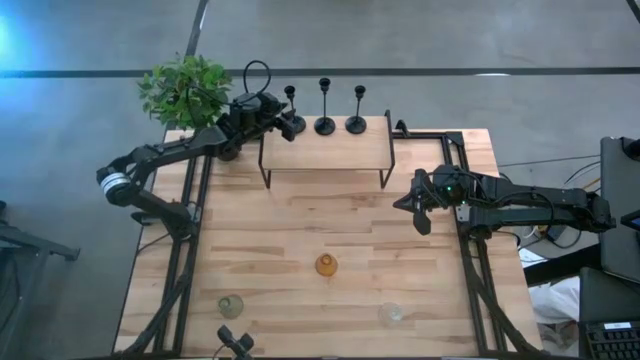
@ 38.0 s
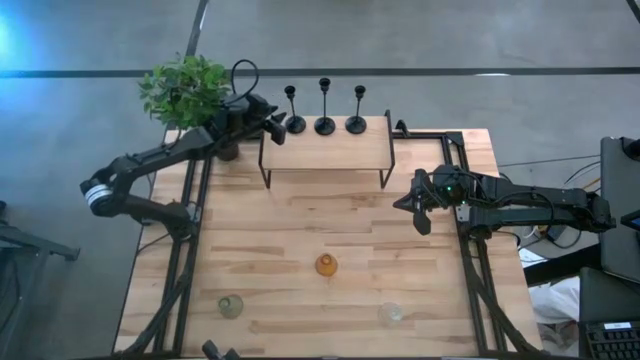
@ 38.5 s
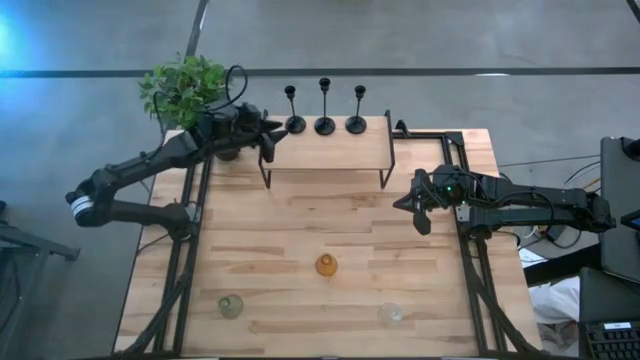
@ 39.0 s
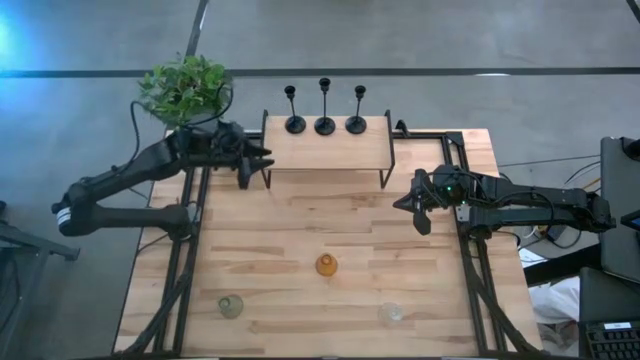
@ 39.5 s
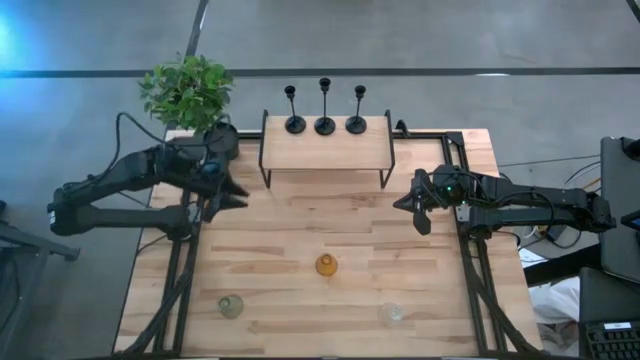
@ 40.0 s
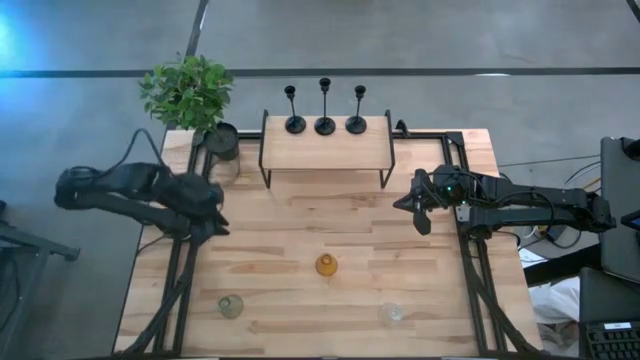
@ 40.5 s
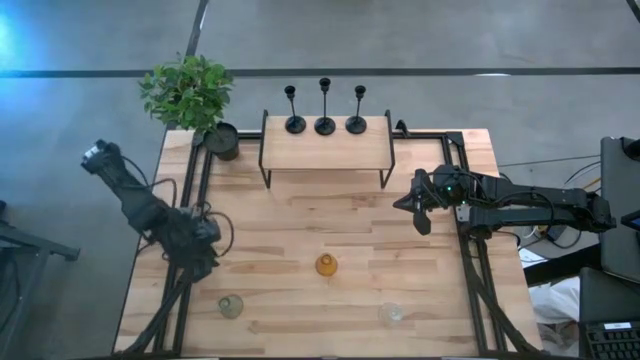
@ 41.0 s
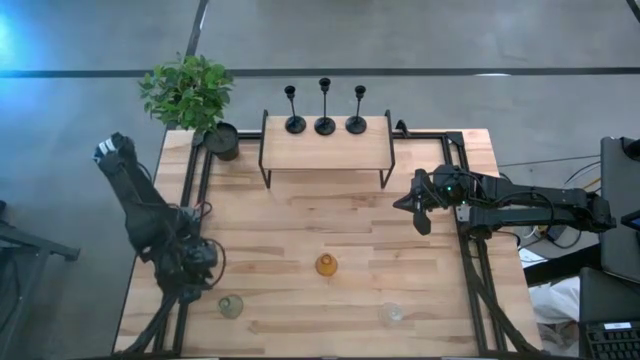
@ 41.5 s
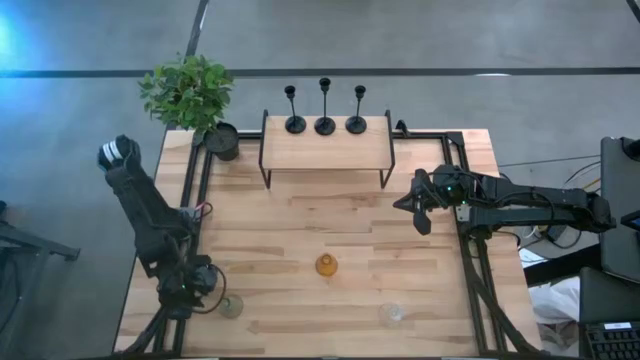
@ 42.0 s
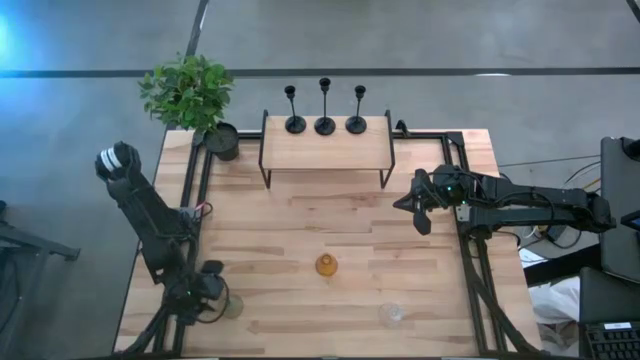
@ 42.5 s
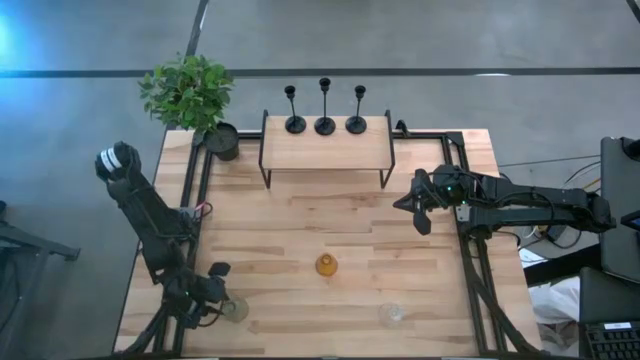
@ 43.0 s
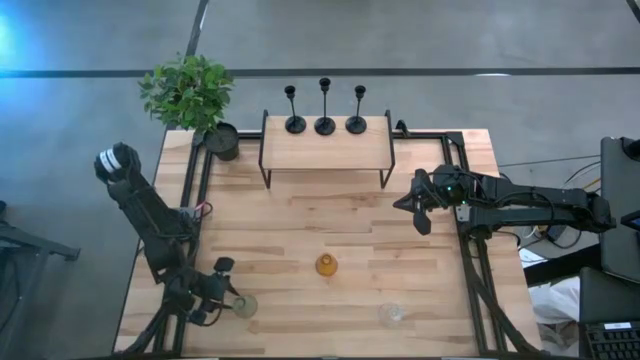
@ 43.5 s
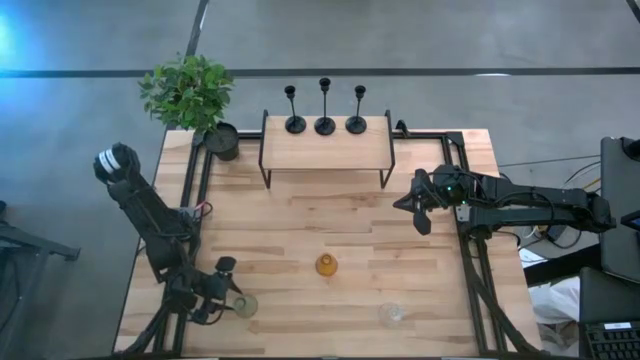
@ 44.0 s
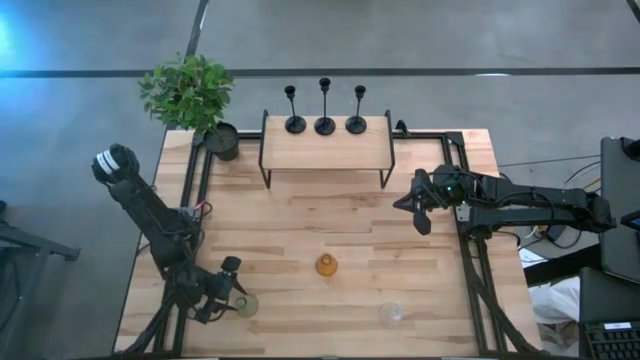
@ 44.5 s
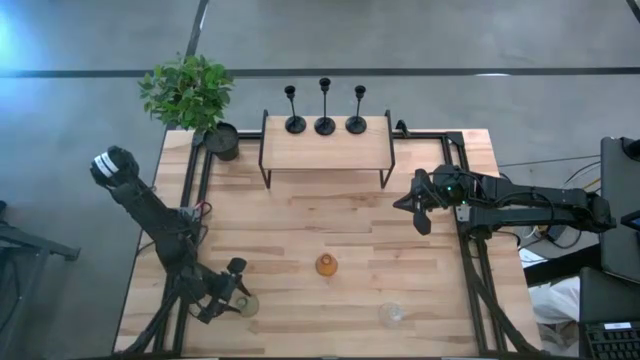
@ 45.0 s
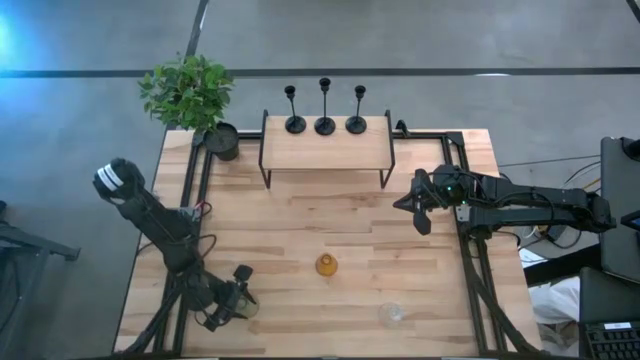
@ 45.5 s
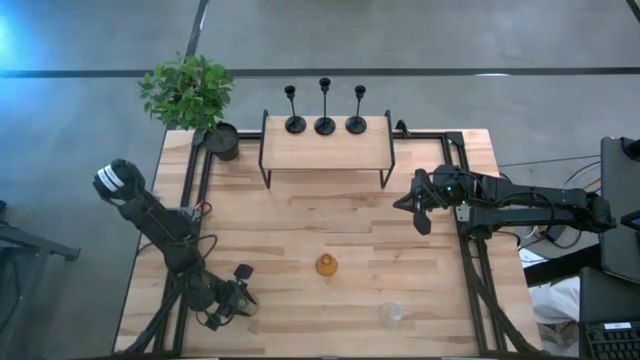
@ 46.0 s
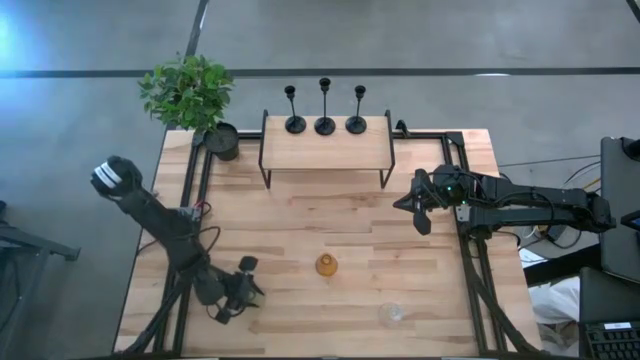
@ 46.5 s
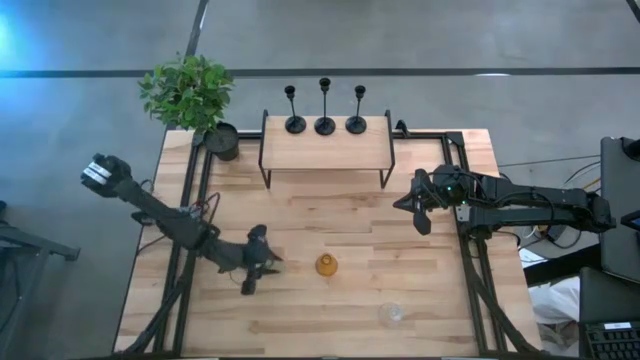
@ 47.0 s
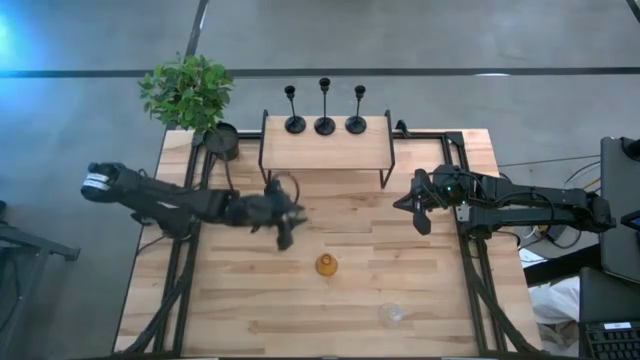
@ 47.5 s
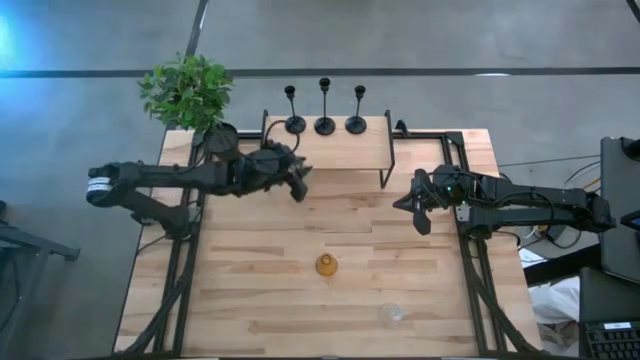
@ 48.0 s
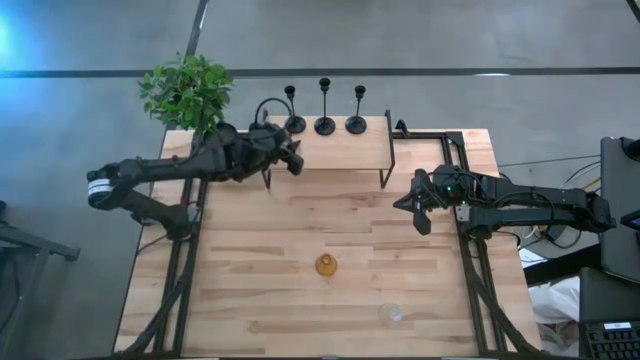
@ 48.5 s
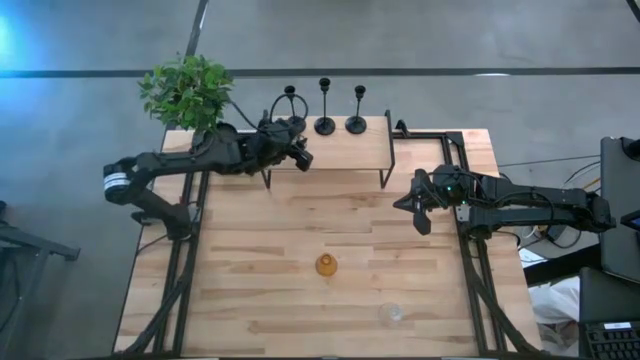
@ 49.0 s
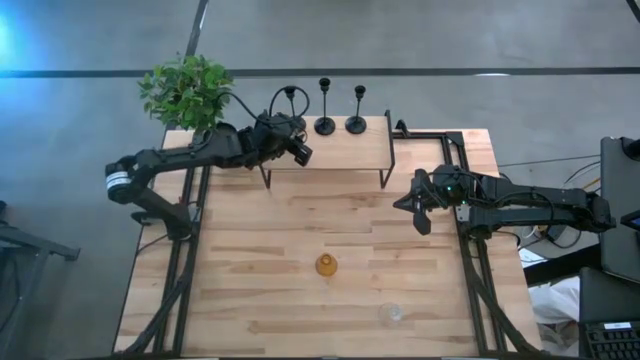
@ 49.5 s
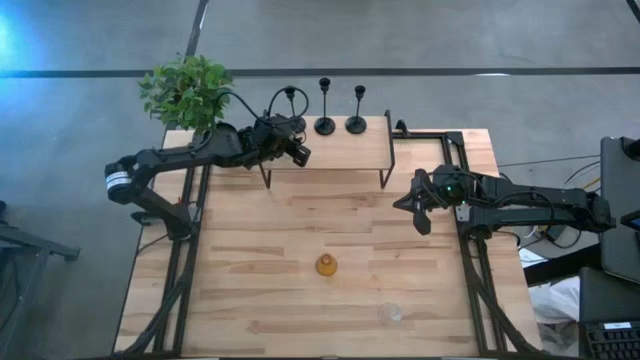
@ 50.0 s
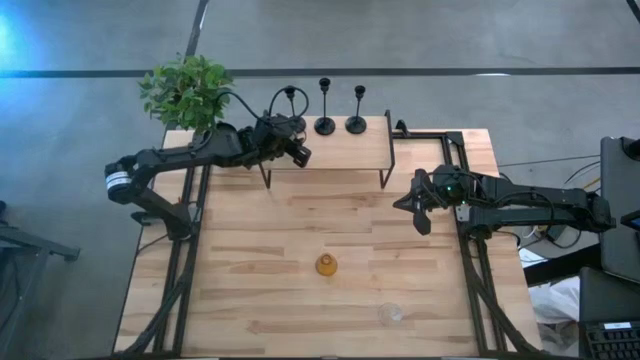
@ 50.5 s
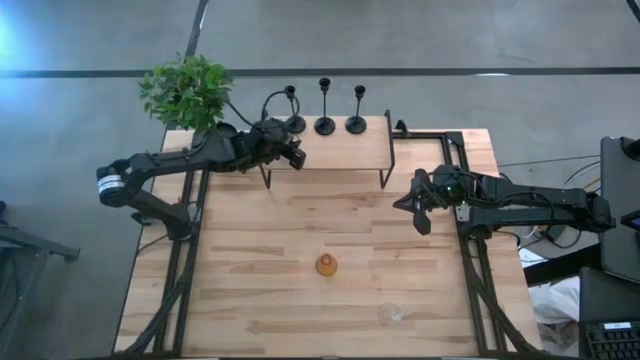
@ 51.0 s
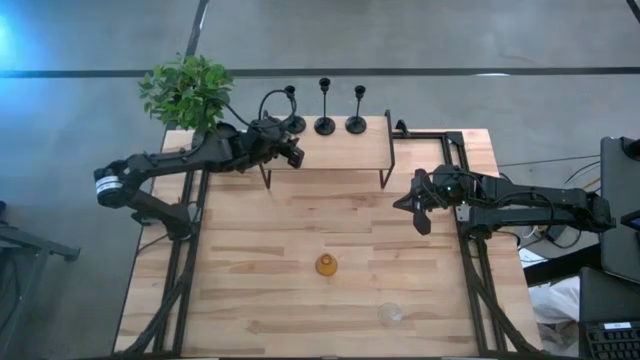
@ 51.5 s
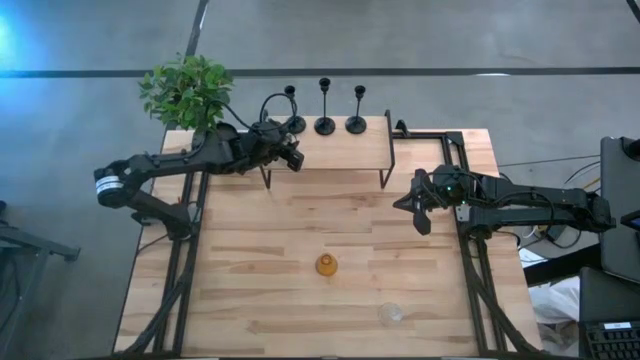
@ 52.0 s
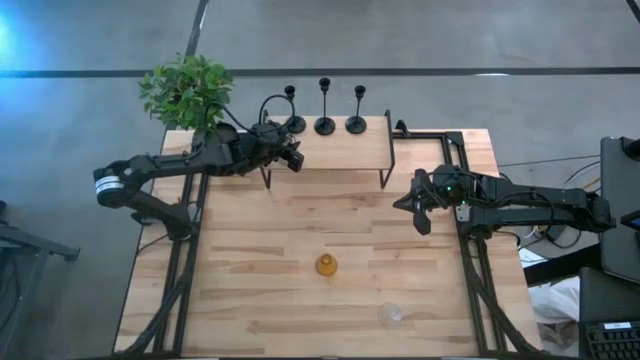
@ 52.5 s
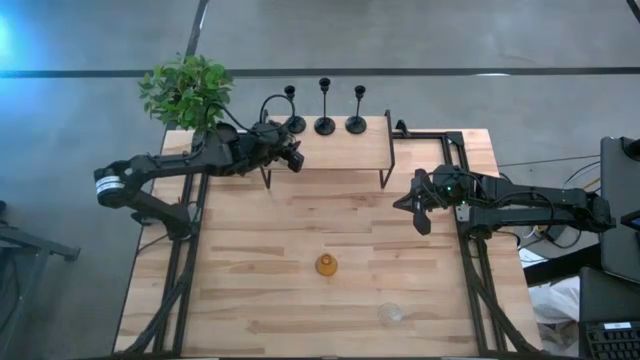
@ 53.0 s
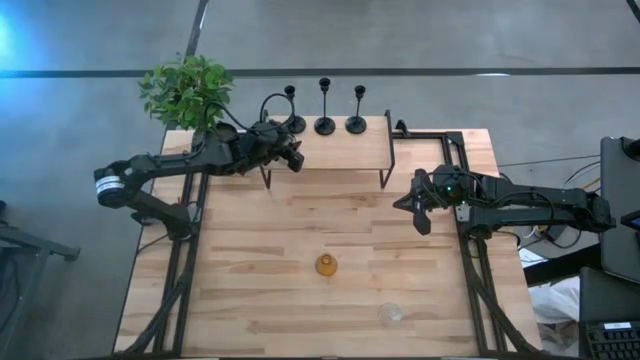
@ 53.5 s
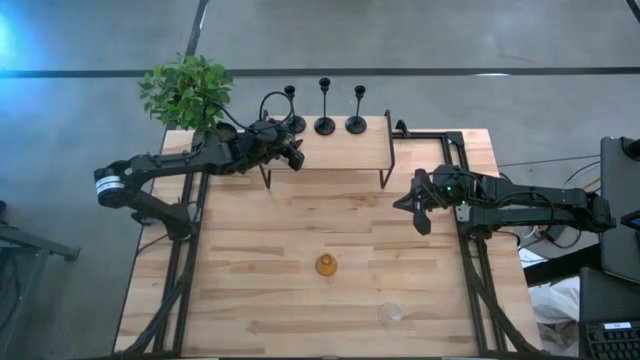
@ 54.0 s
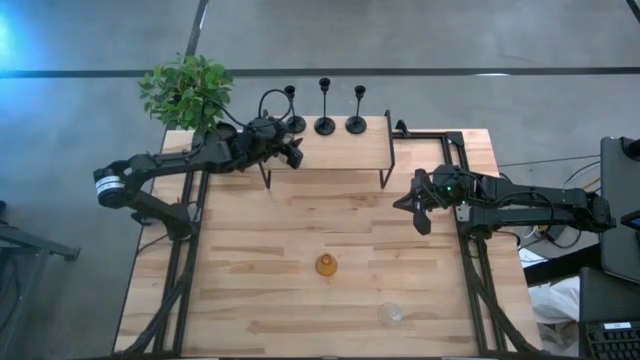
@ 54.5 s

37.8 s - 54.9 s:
Task: Pick & Place candle stick holders
Put the green candle holder on the shelf

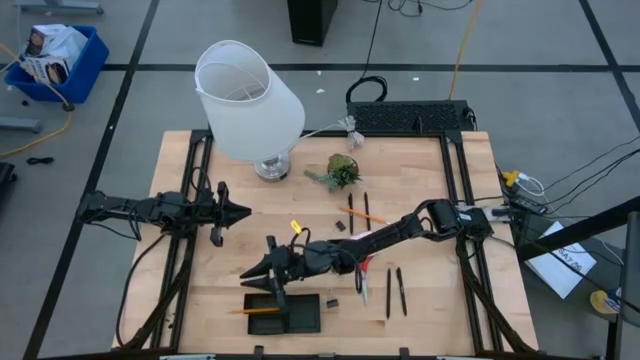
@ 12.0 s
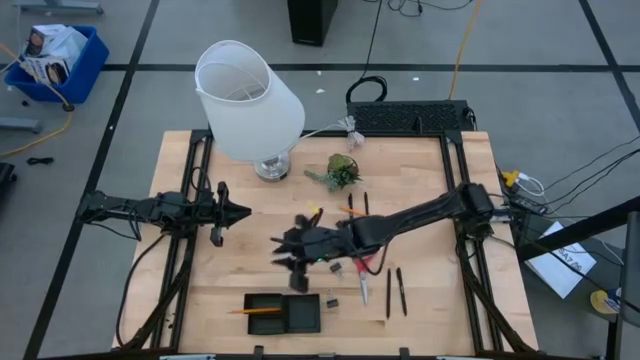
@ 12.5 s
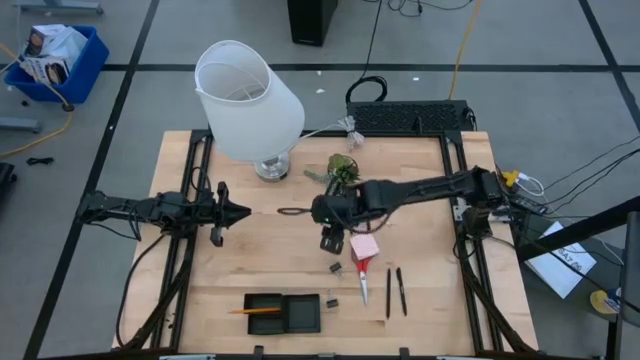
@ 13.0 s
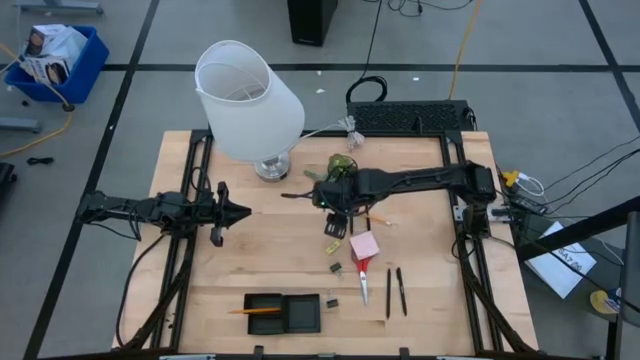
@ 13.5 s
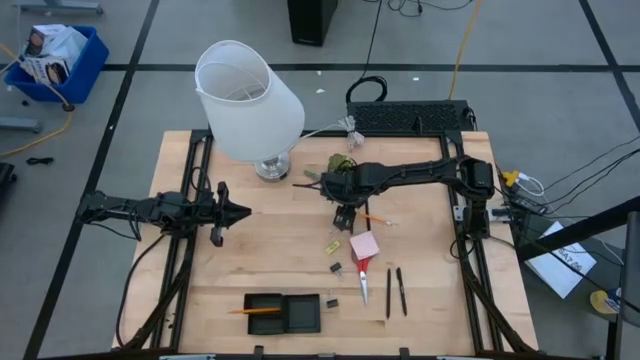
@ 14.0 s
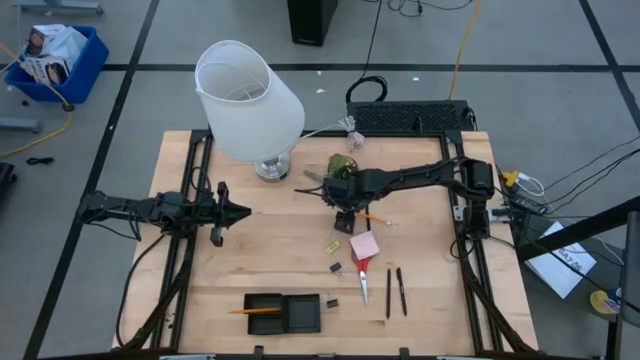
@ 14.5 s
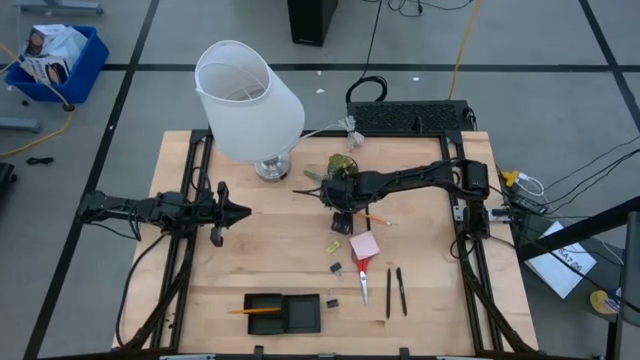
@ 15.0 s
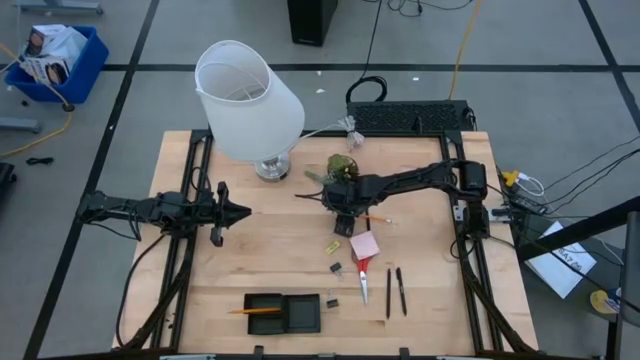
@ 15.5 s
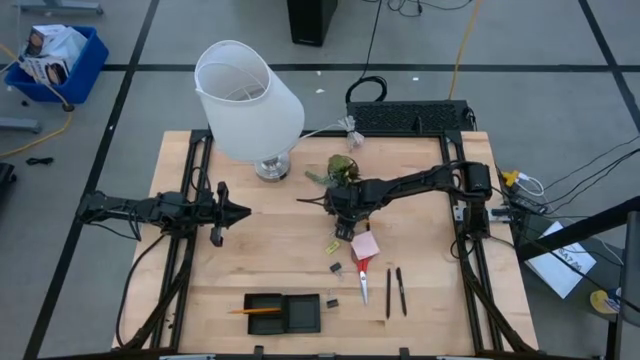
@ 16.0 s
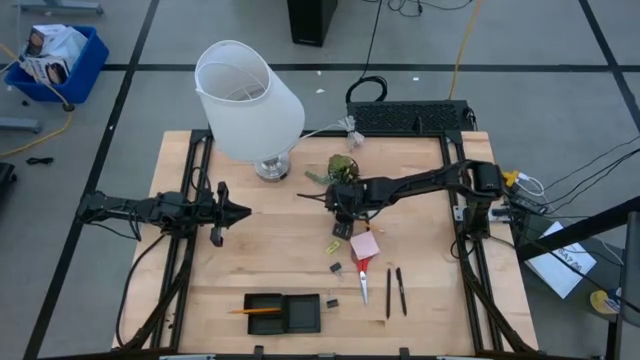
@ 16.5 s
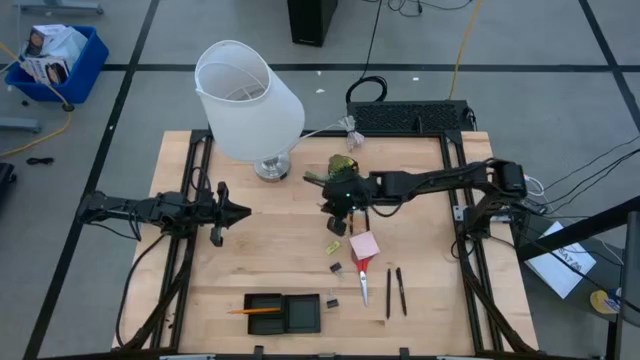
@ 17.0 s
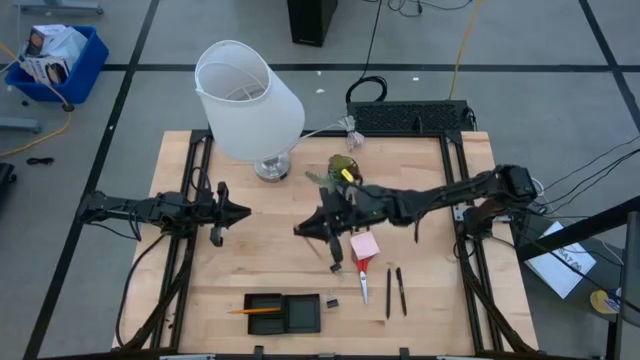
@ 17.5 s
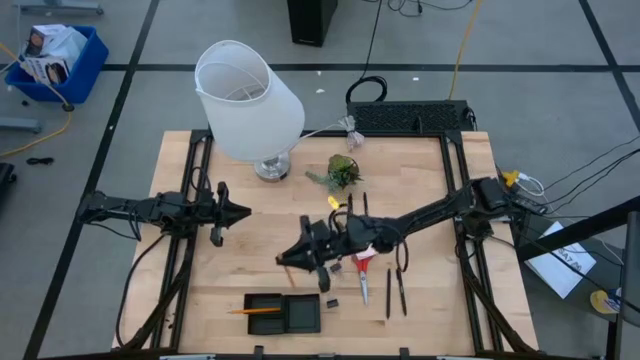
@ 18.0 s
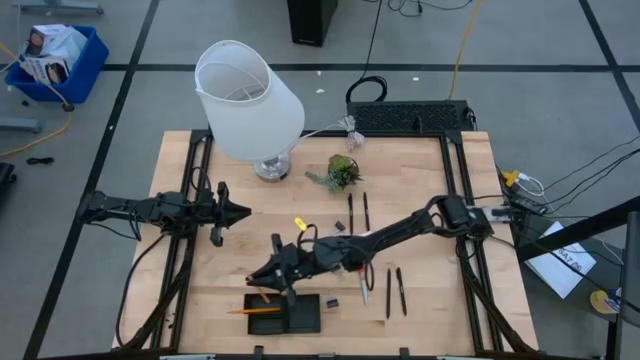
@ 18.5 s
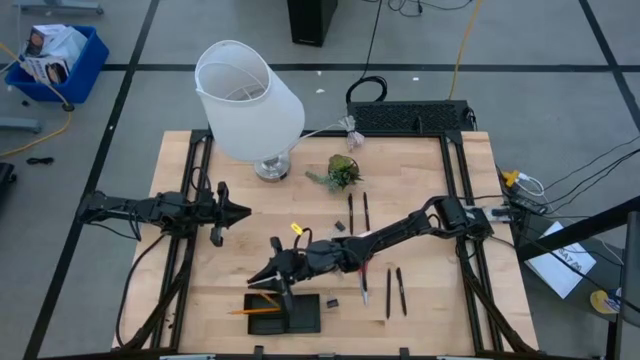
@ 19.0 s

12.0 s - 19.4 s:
Task: Pick and place office supplies into organizer
Put the yellow pencil into the mesh desk organizer
